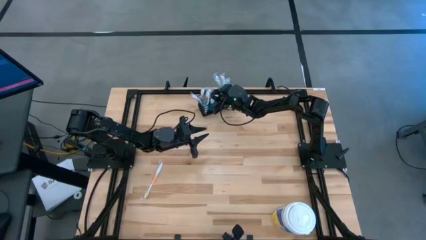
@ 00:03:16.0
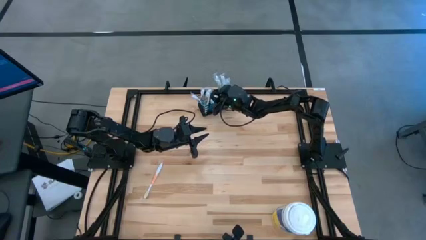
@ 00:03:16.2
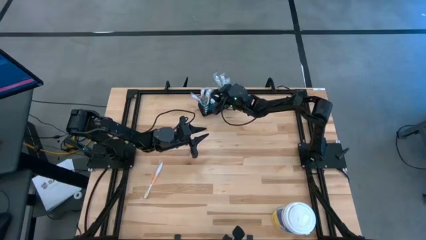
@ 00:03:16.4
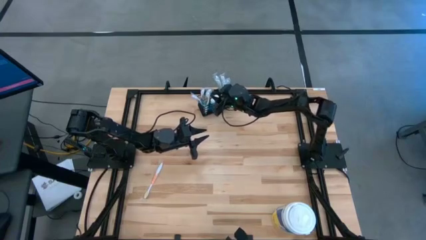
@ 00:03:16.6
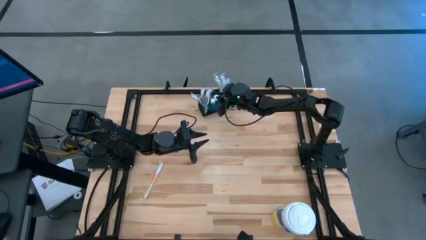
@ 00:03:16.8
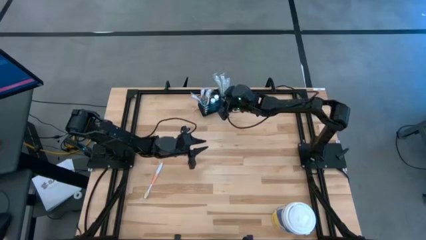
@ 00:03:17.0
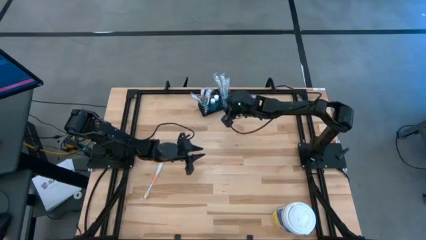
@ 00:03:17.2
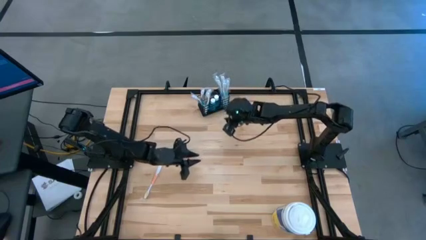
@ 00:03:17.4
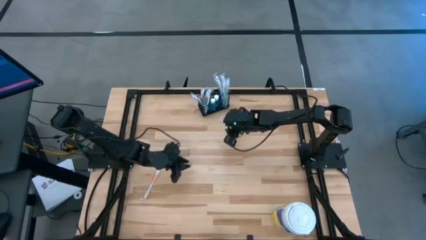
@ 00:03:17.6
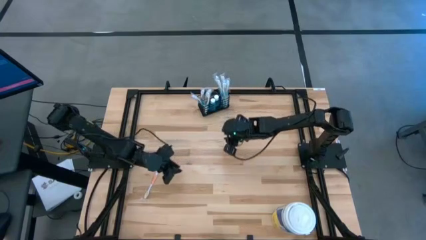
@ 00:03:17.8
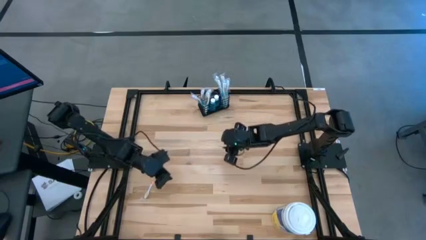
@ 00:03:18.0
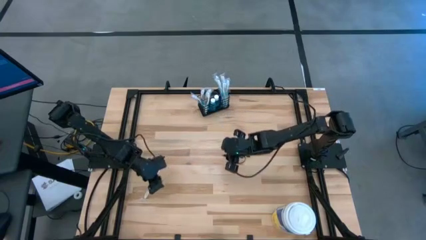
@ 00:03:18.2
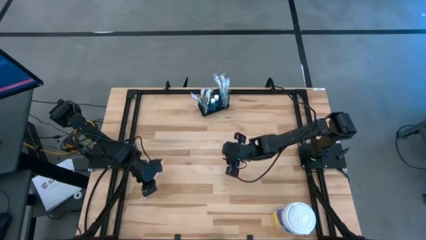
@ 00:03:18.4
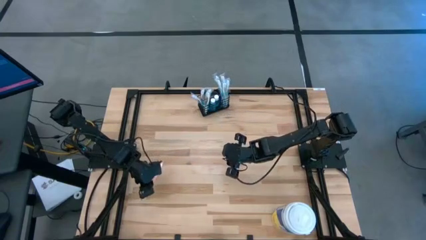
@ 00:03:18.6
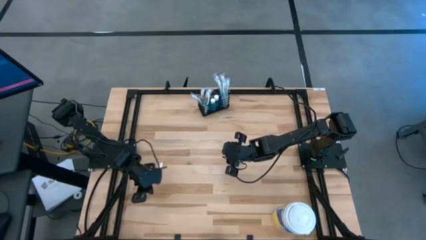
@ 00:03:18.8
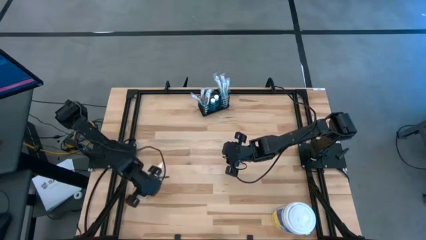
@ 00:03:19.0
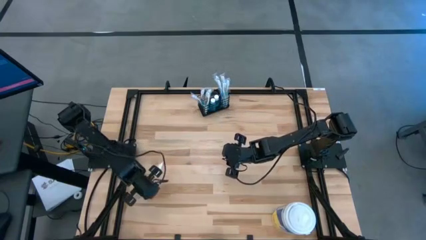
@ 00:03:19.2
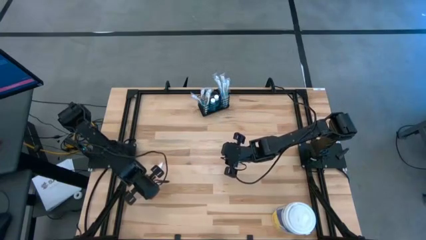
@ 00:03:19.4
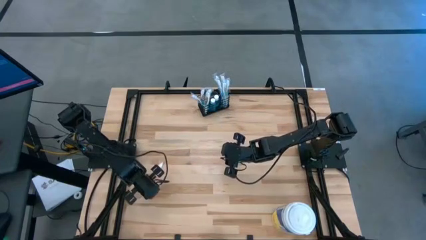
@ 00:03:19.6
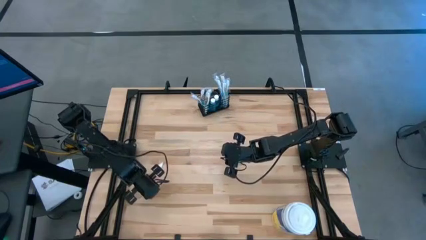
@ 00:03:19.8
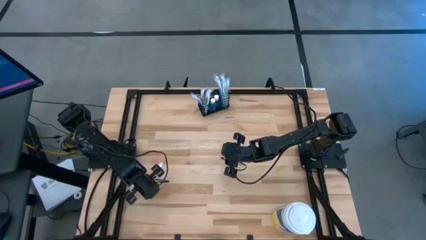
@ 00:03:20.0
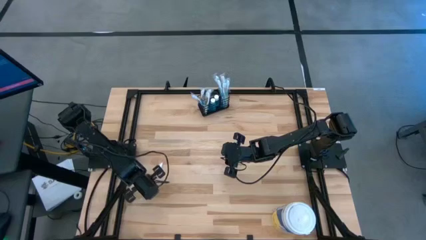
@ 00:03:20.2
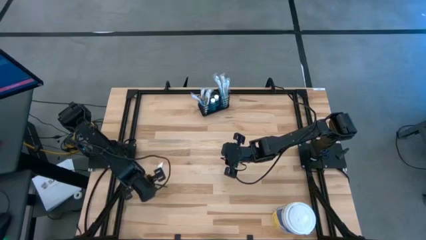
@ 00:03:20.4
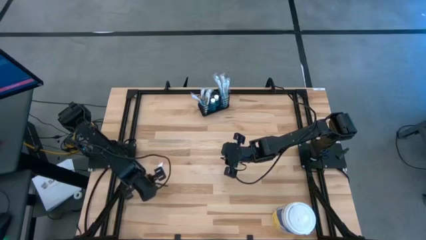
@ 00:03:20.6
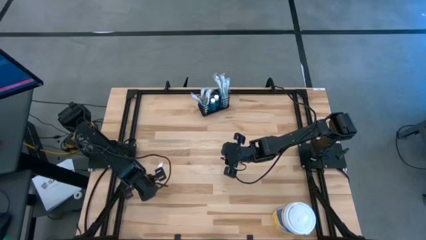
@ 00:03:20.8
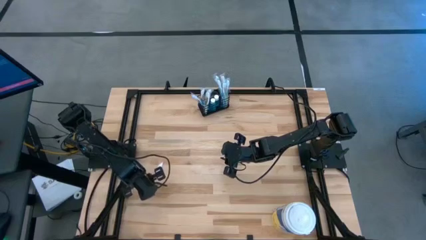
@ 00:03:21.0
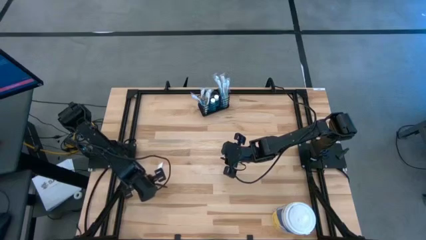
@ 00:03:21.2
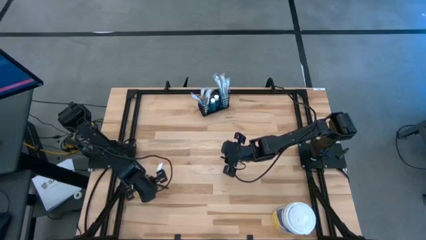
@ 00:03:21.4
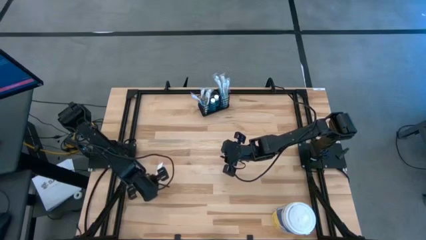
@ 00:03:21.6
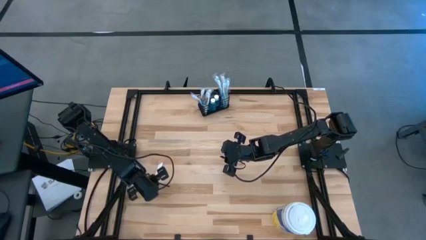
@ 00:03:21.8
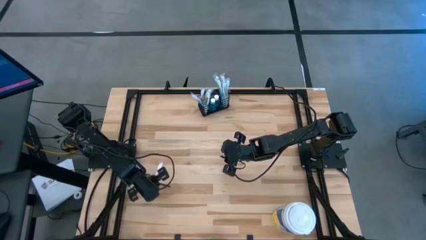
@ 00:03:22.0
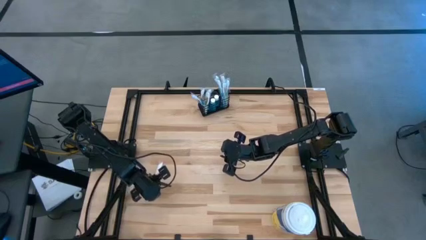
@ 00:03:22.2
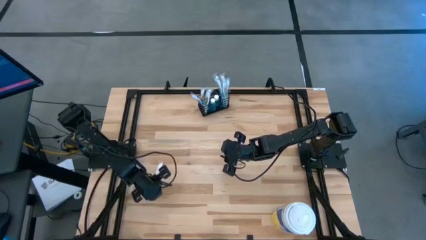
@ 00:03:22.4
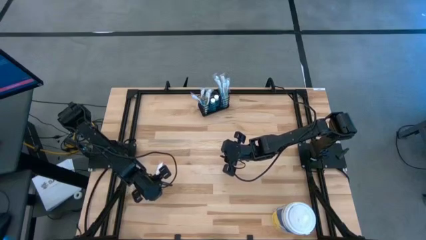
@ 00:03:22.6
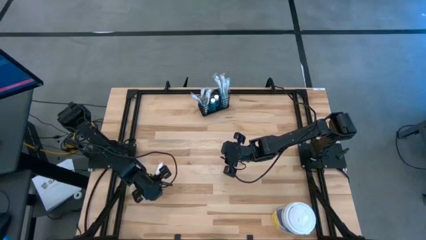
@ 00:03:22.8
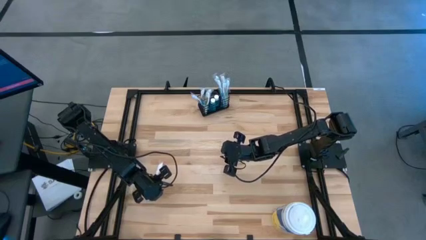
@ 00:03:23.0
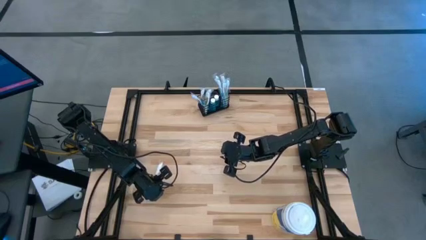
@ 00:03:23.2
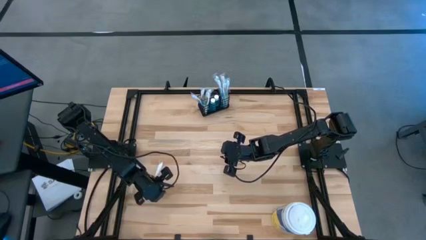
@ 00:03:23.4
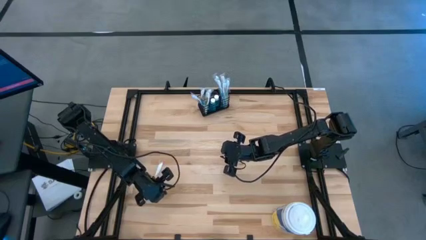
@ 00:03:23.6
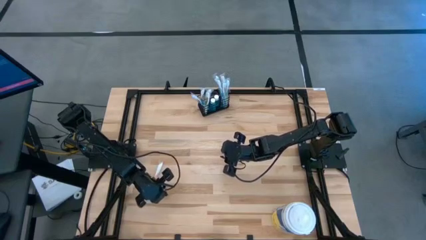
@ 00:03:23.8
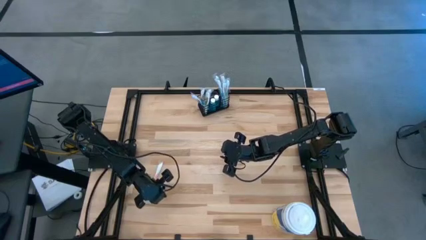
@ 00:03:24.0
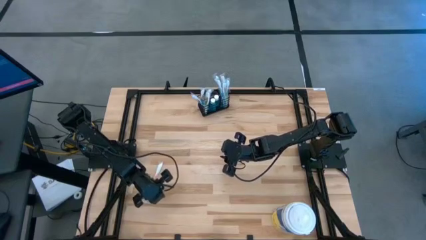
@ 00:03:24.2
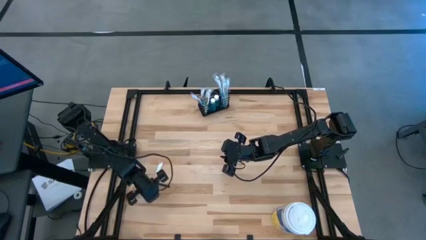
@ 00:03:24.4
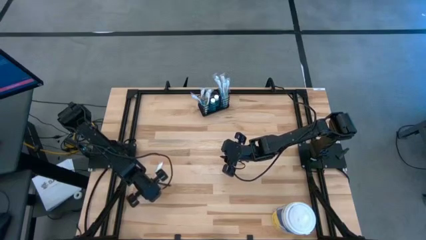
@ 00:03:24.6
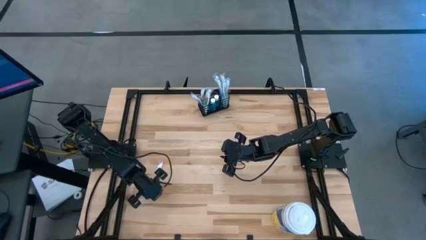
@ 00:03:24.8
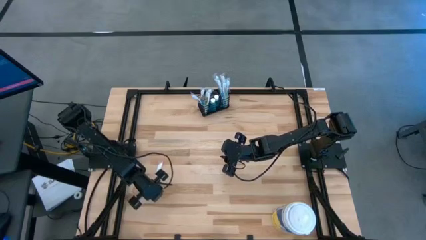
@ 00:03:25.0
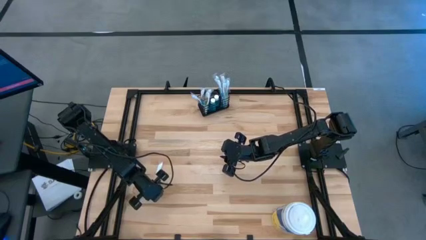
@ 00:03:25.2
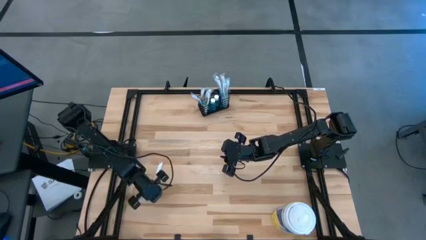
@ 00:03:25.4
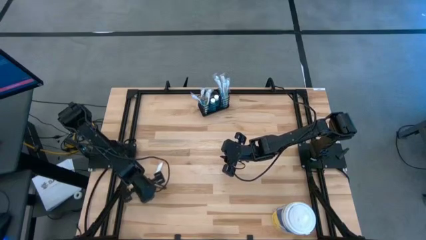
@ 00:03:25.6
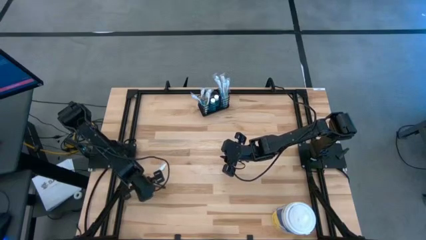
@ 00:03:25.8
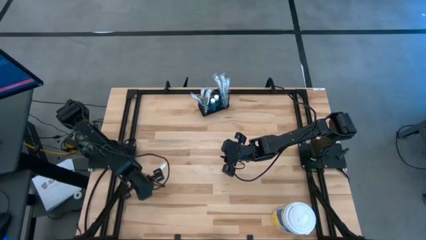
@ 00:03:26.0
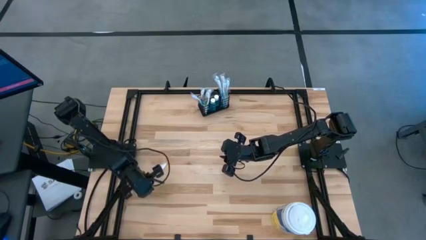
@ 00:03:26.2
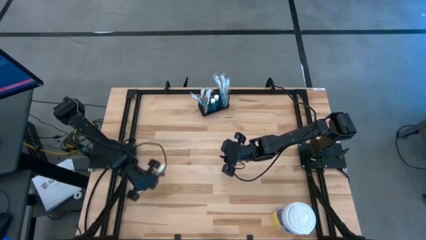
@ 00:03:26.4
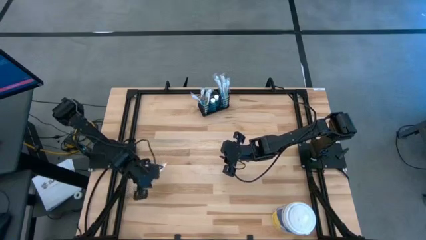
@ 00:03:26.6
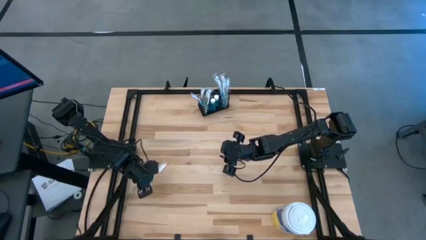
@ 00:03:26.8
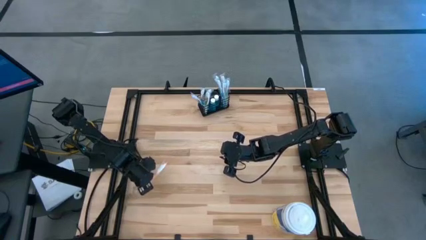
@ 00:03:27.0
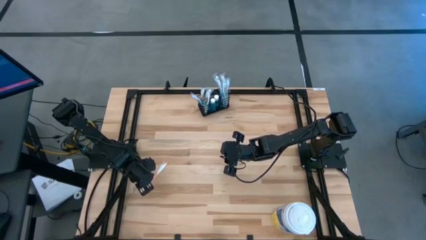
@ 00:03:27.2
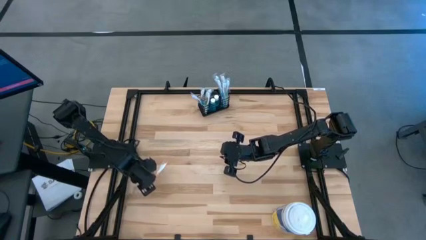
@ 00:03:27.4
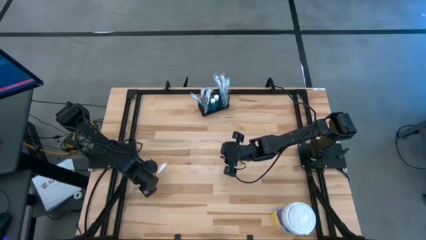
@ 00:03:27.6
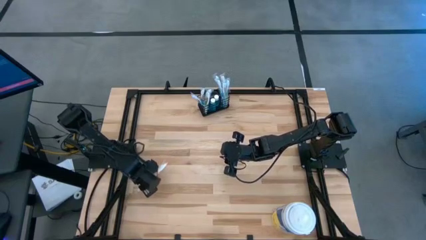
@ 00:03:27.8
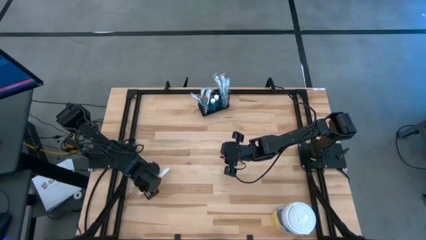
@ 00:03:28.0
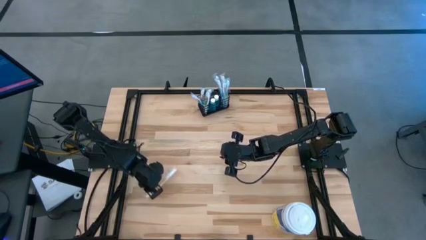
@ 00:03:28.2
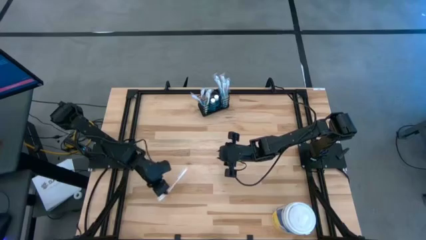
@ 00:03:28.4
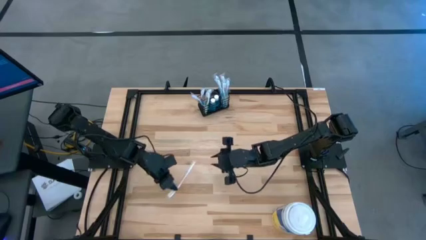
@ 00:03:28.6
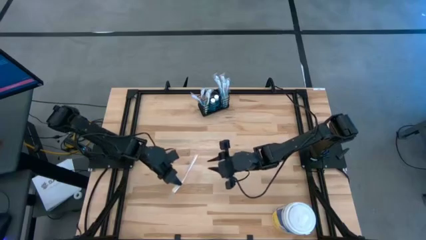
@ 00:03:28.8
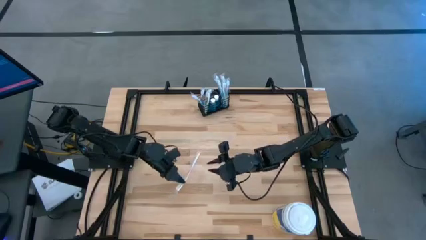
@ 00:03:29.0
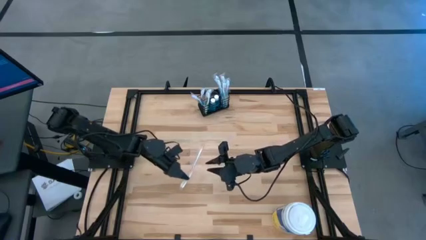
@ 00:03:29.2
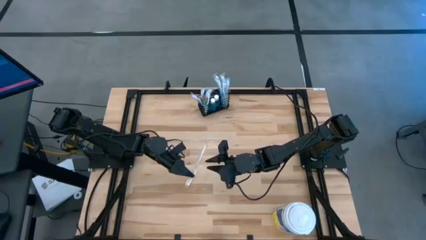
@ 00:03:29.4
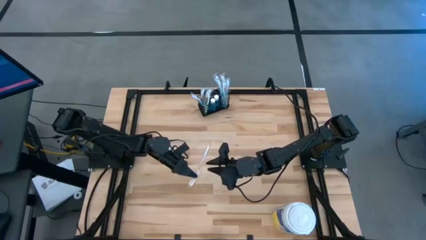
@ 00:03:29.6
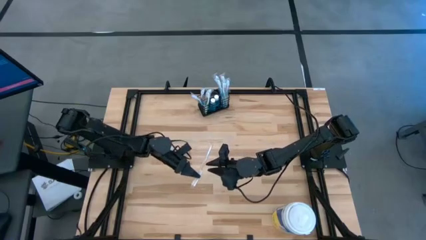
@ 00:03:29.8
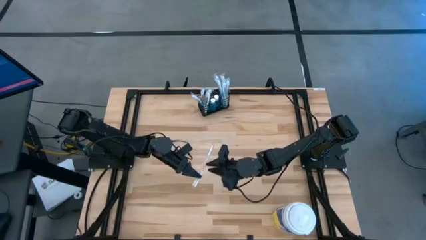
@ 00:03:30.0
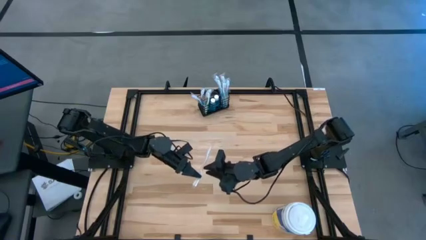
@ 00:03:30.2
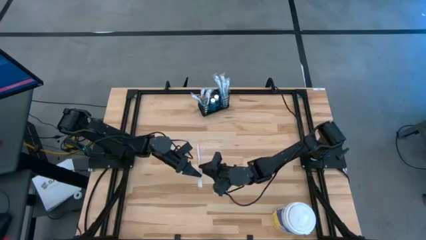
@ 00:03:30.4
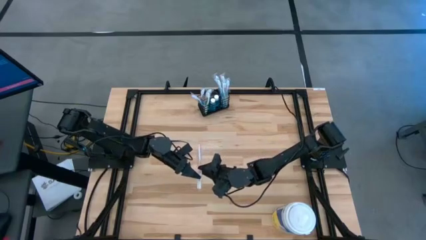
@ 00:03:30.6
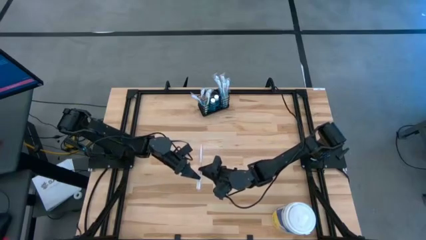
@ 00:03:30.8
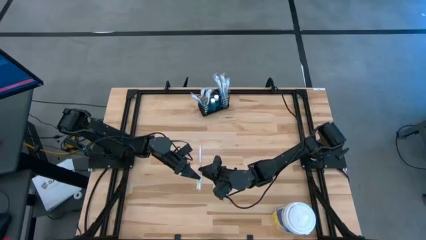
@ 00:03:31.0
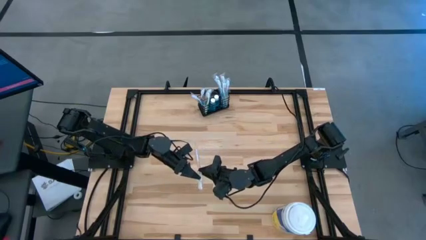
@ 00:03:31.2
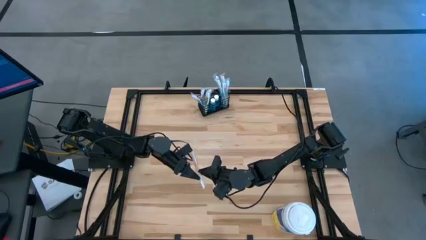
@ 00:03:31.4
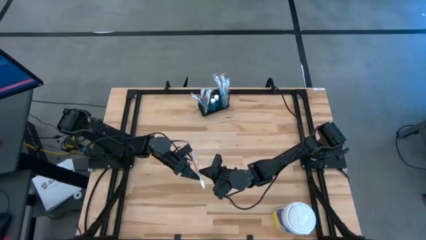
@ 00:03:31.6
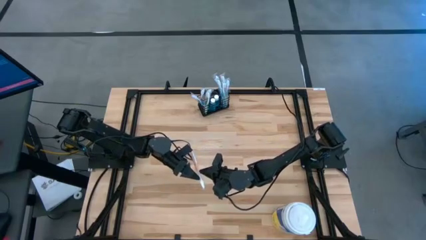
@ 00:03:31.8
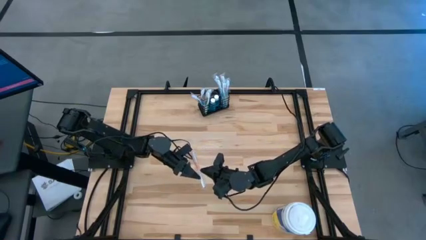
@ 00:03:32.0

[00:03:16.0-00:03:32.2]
Task: Pick & Place toothbrushing station
Put the orange toothbrush into the black wire organizer
